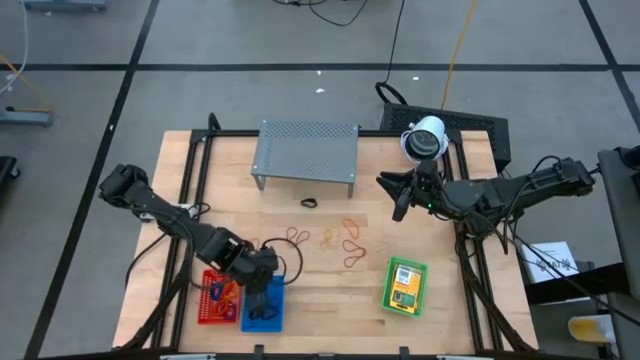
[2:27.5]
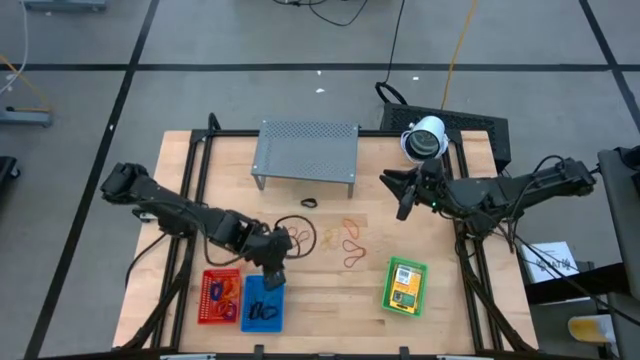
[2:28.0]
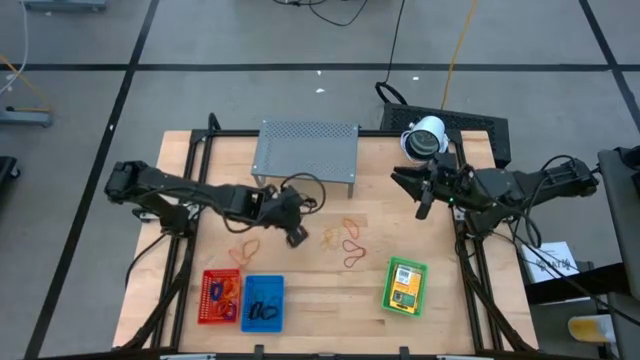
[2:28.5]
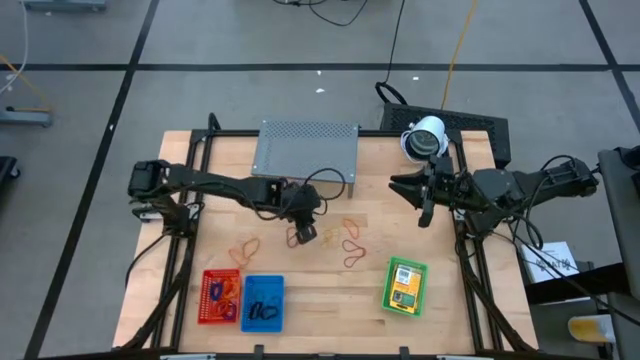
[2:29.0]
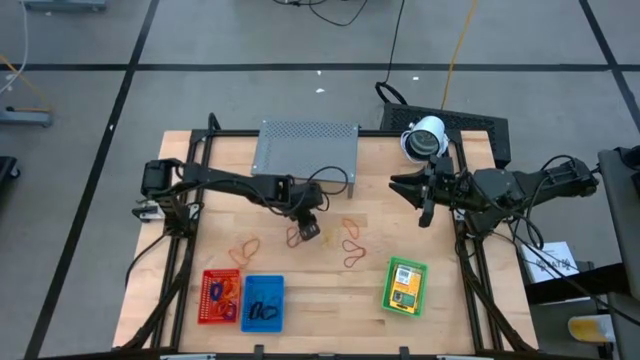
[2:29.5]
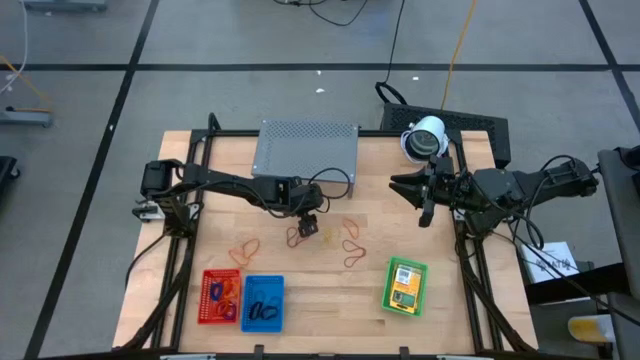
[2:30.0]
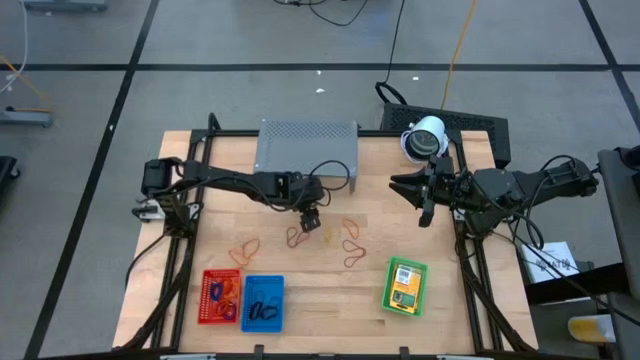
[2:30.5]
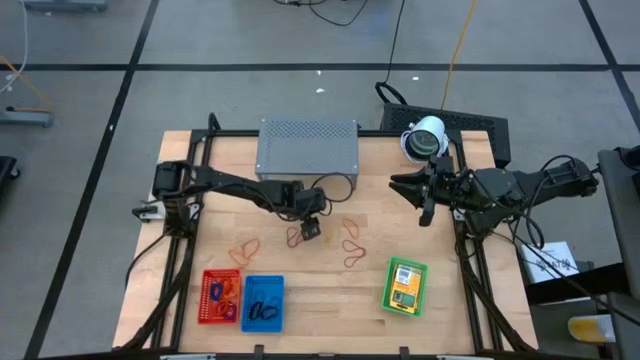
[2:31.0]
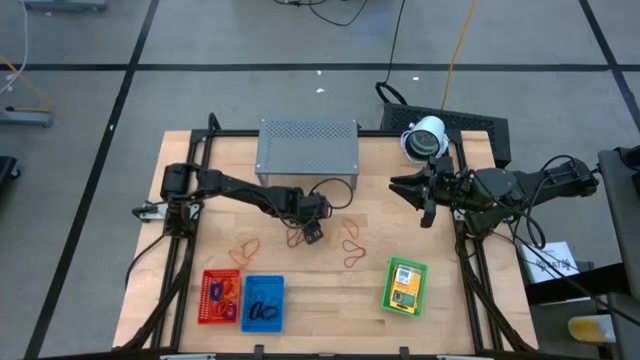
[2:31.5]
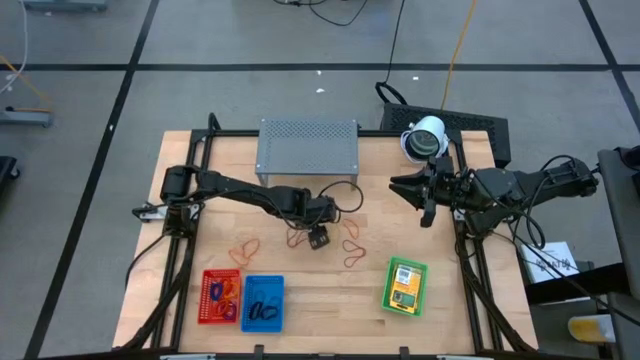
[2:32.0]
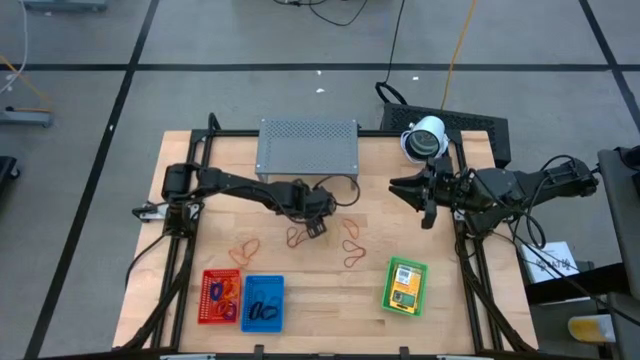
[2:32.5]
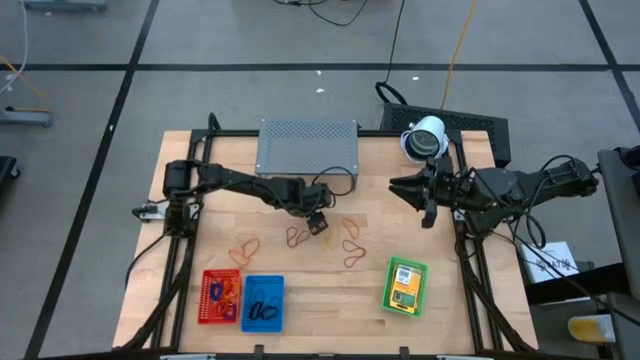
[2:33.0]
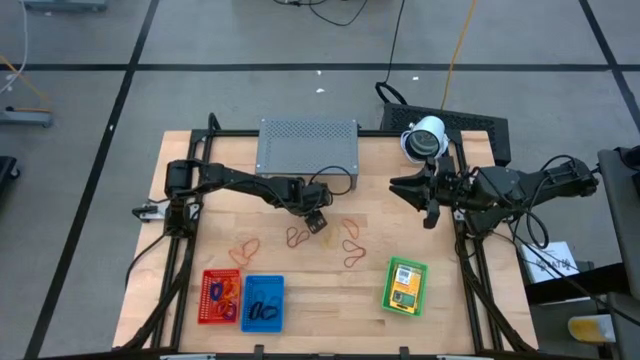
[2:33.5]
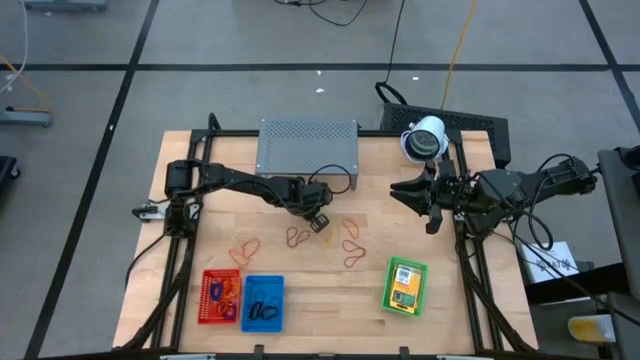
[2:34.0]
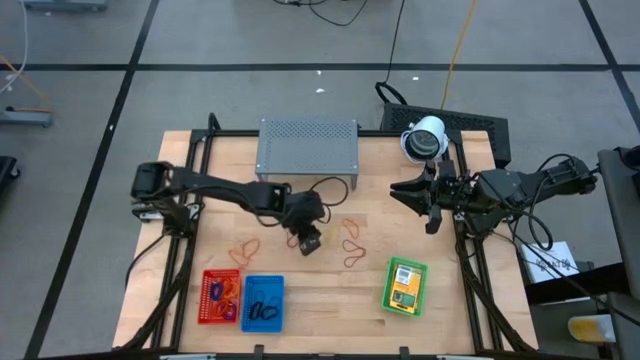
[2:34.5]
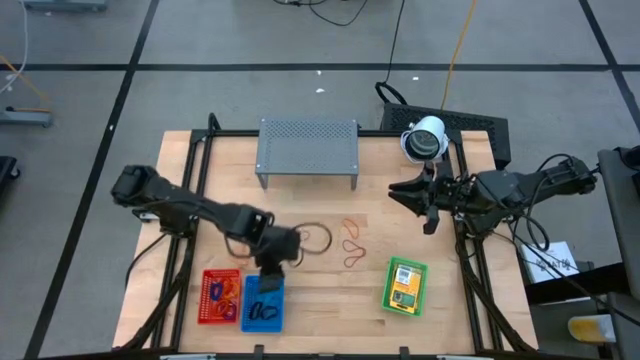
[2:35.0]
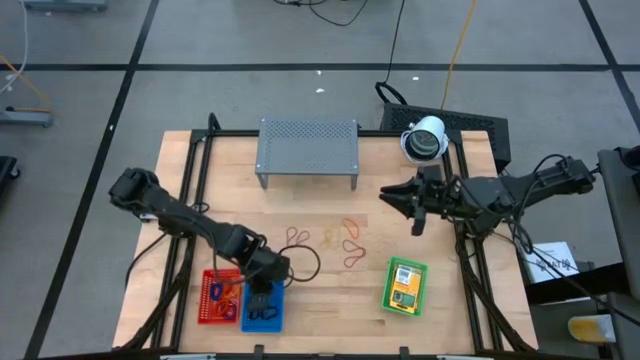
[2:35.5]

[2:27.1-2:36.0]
Task: Pick & Place Office Desk Supplies
Put th black rubber band into the blue bin

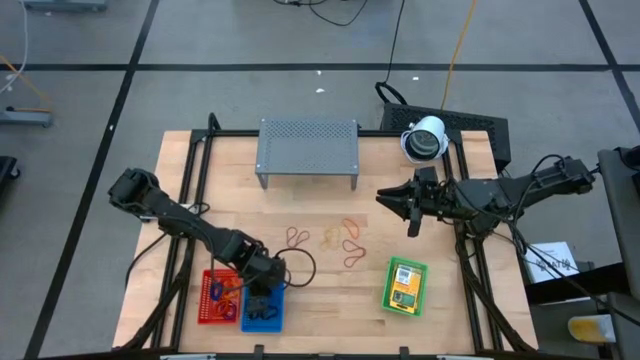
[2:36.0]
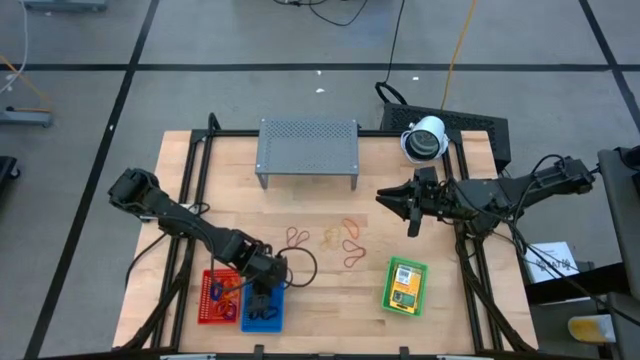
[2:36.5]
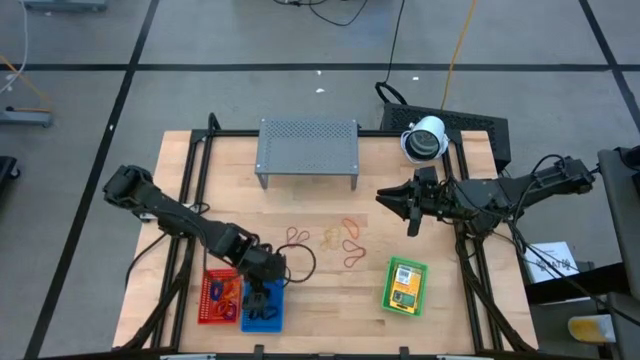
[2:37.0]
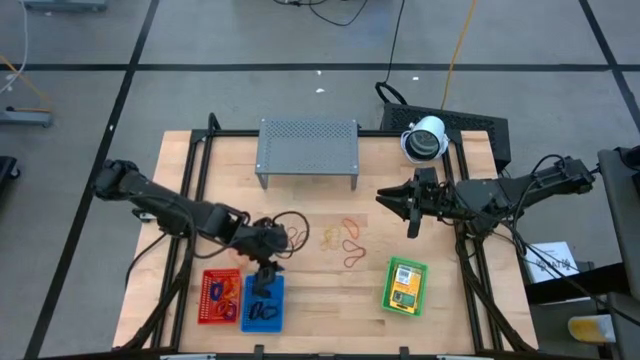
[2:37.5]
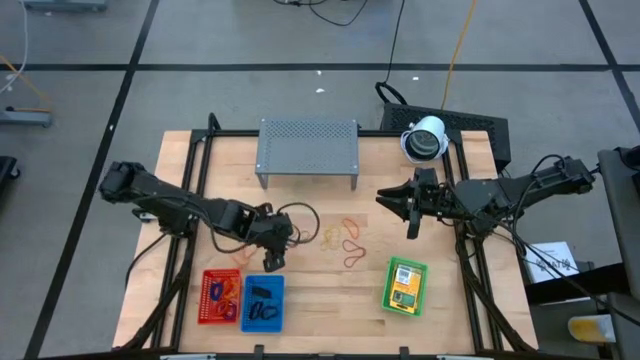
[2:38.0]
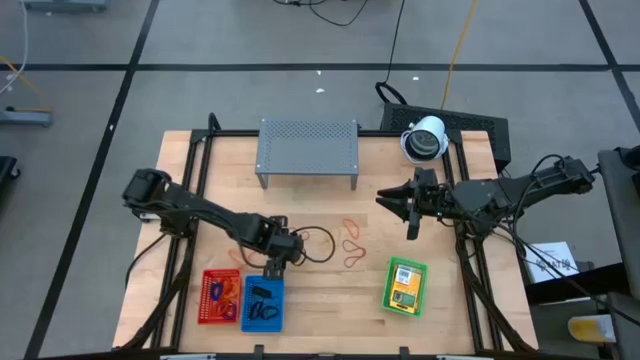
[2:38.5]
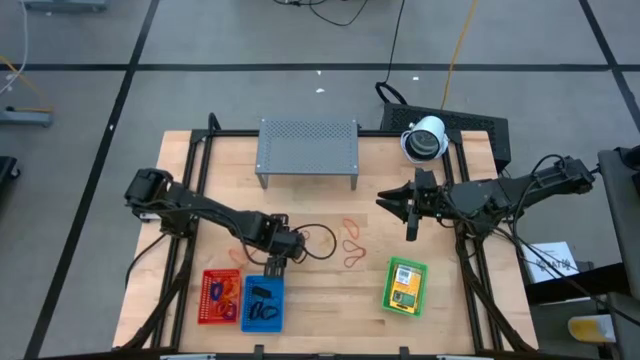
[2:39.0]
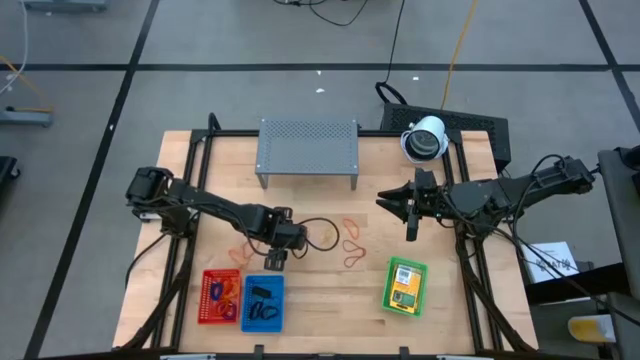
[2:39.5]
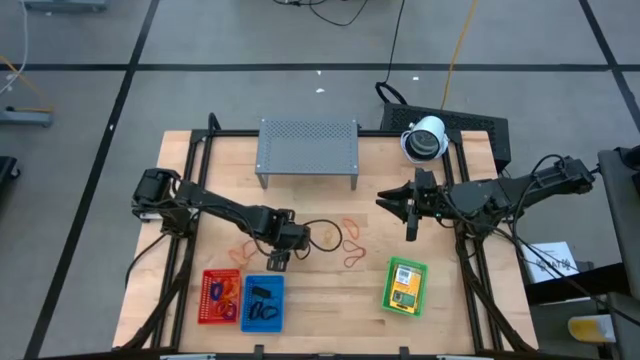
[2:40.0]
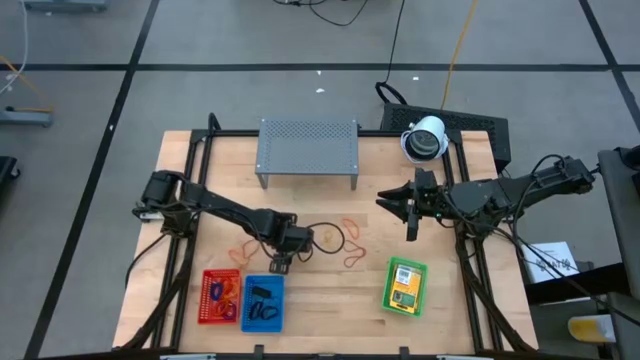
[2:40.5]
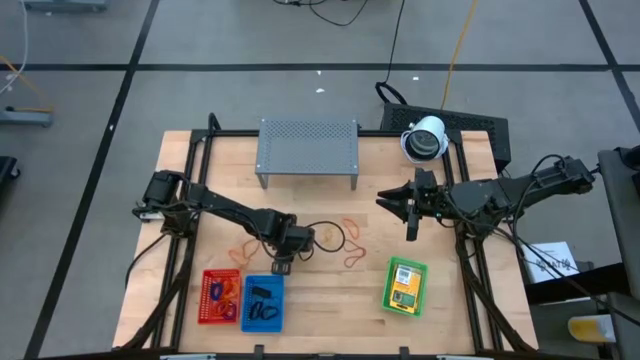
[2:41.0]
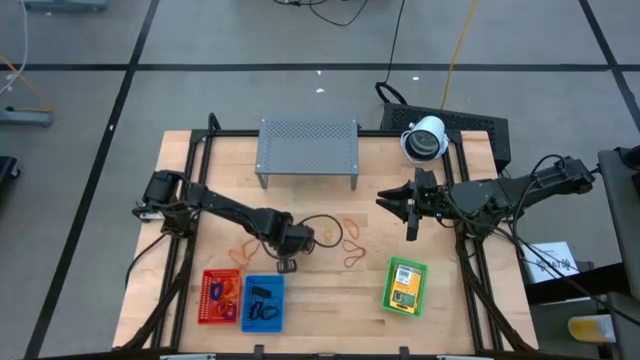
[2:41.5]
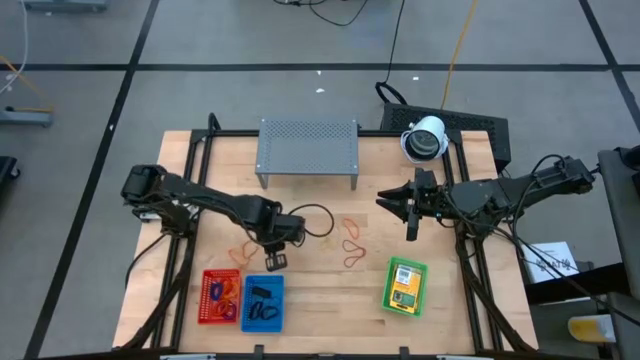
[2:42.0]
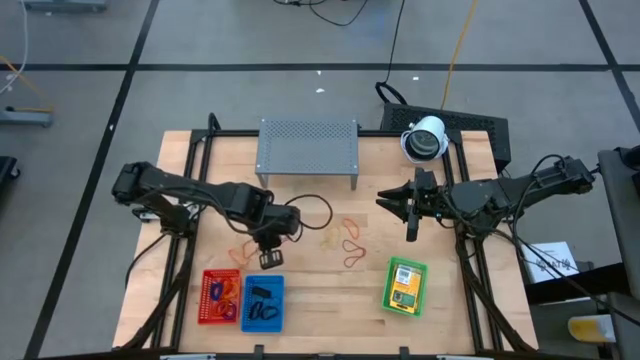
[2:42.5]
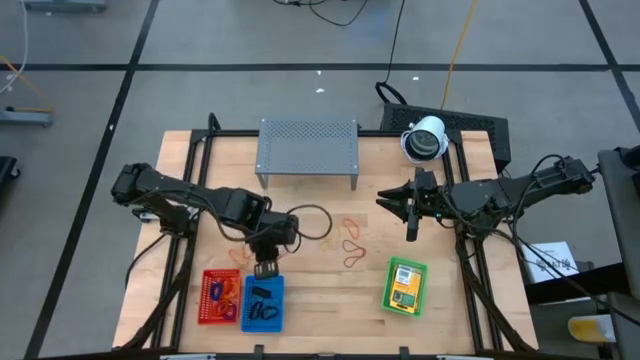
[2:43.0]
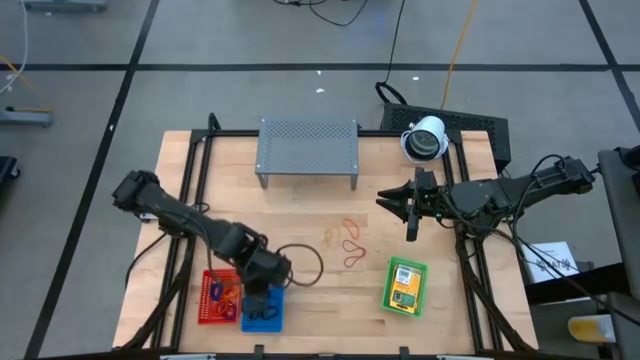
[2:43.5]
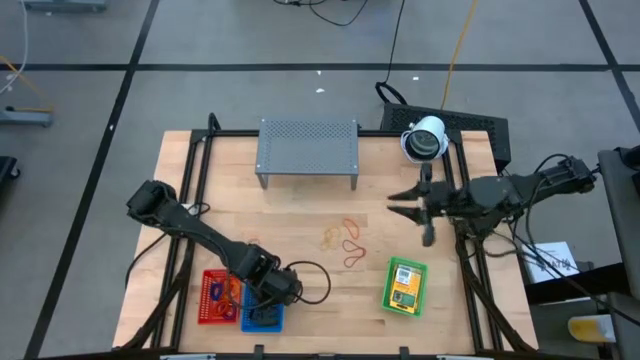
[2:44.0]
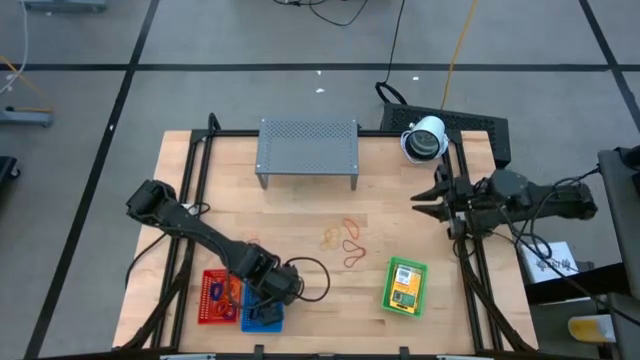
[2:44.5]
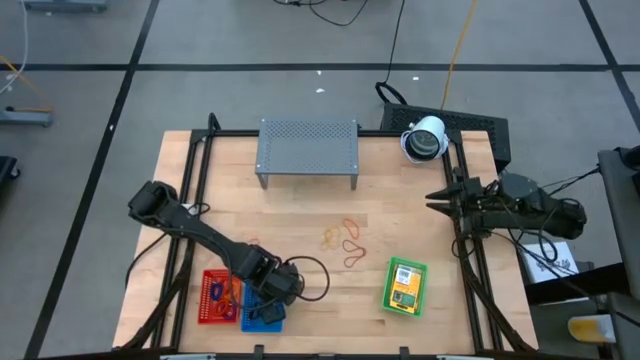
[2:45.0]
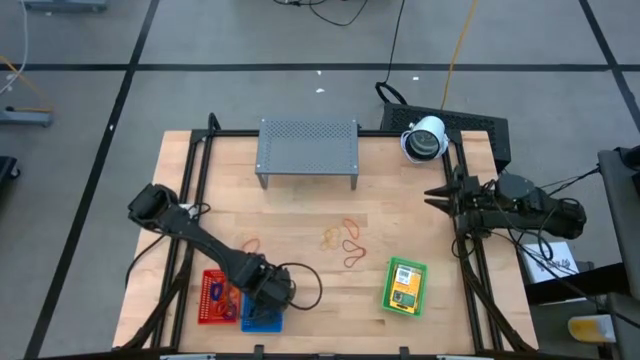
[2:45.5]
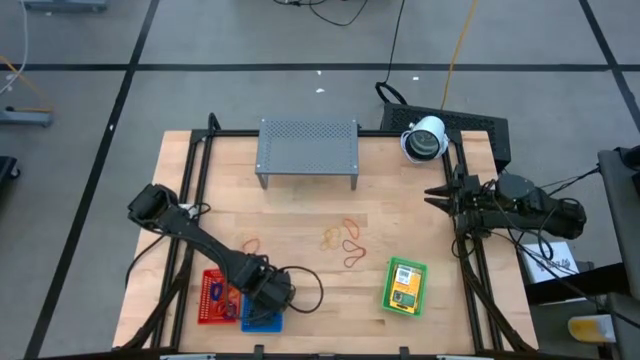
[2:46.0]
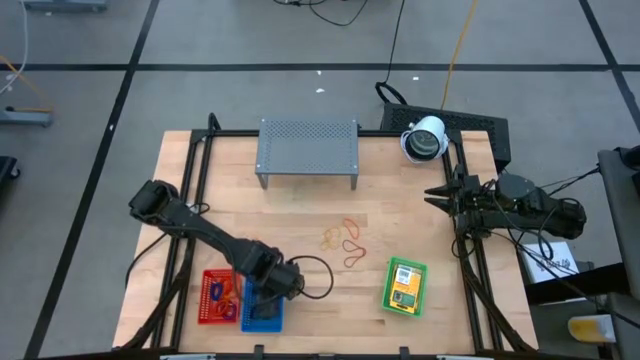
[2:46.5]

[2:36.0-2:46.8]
Put the red rubber band into the blue bin

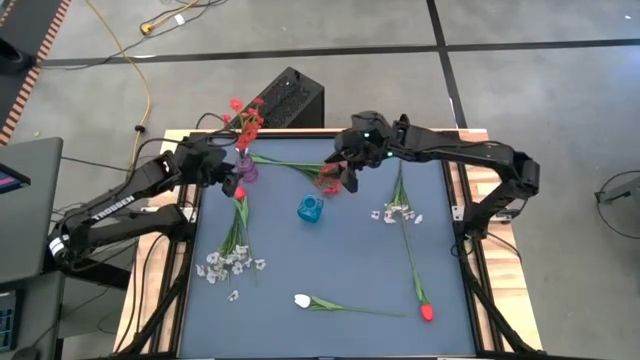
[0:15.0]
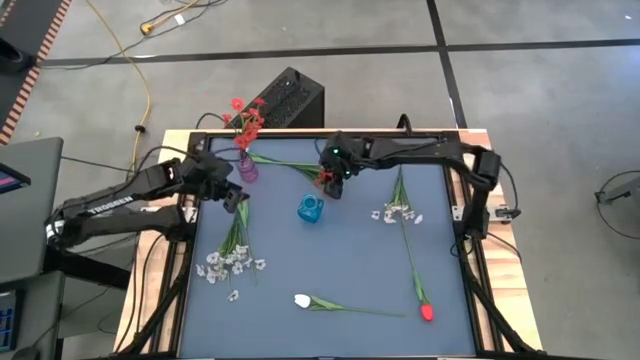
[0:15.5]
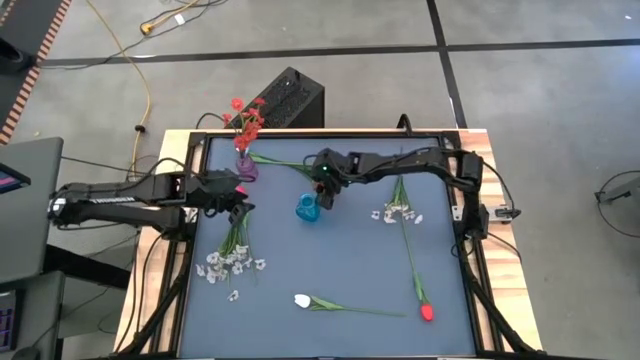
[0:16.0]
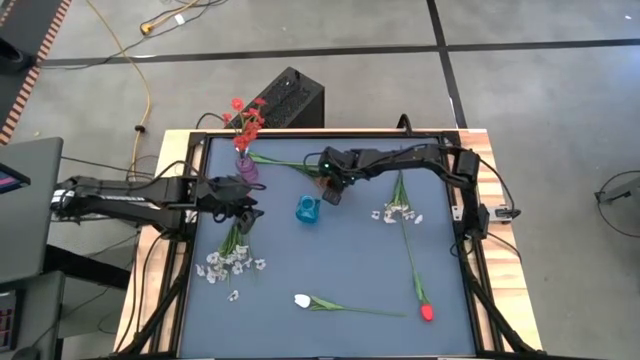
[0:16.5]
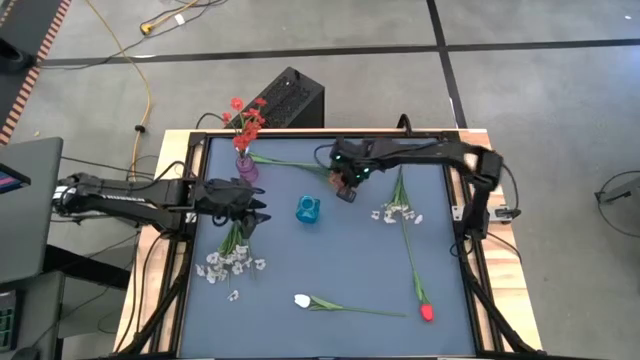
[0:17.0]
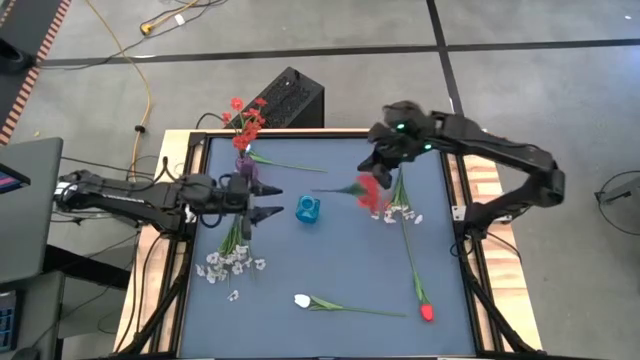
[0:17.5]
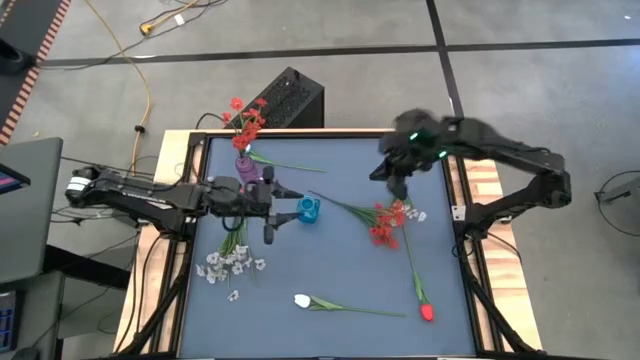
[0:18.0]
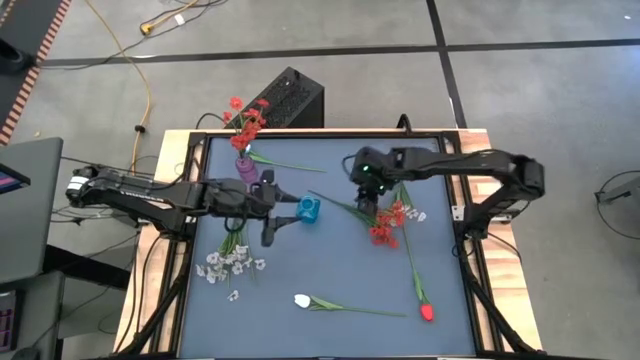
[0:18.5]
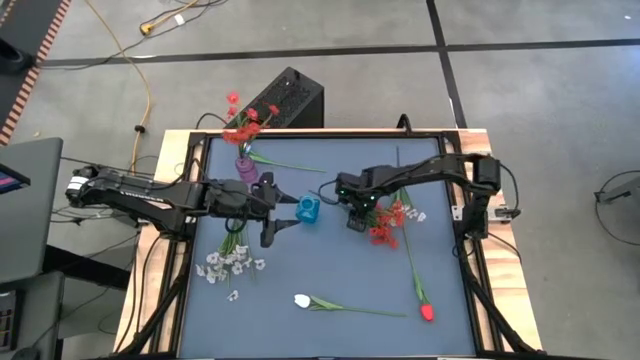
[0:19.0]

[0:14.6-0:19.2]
Task: Sort flowers into vase by color
Put the red flowers into the purple vase
